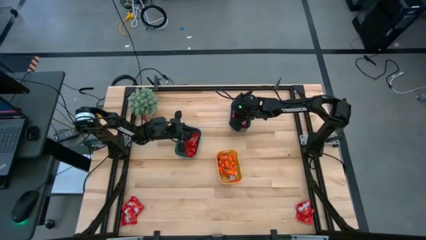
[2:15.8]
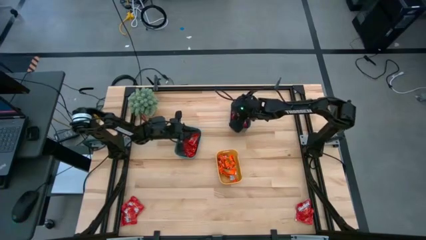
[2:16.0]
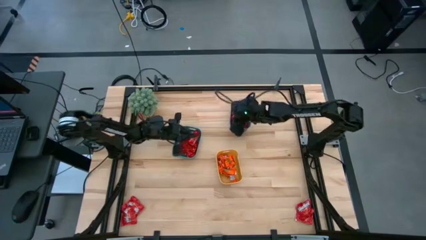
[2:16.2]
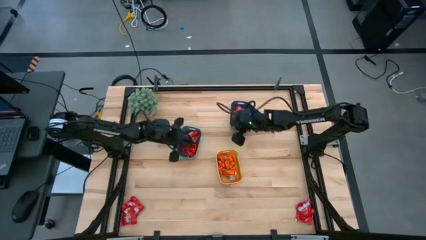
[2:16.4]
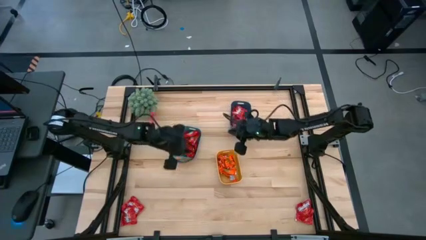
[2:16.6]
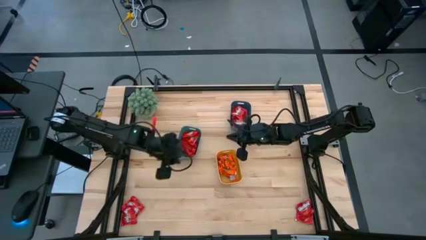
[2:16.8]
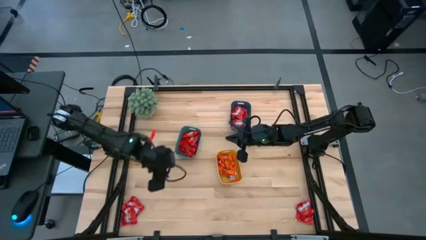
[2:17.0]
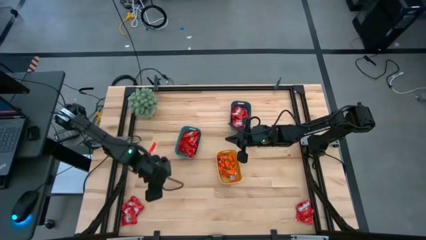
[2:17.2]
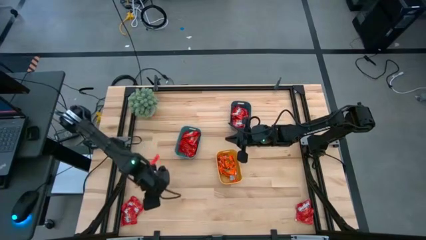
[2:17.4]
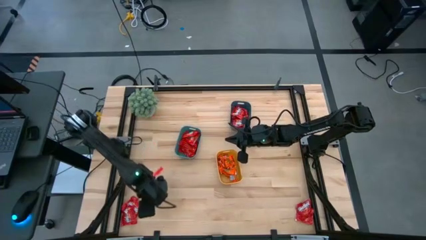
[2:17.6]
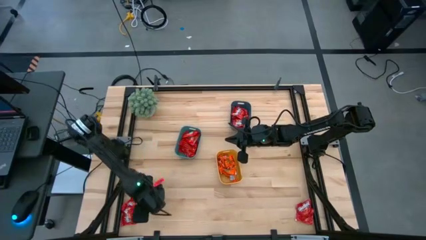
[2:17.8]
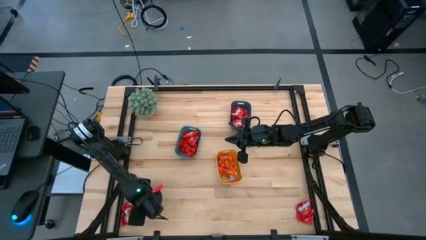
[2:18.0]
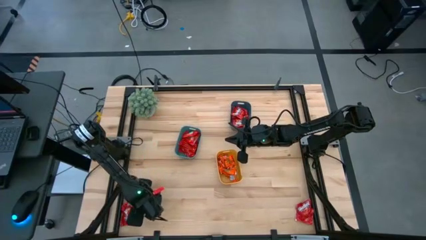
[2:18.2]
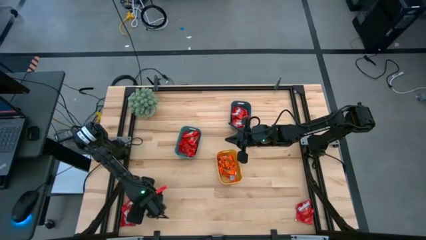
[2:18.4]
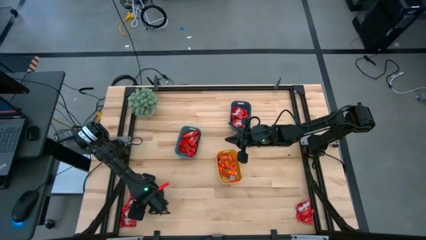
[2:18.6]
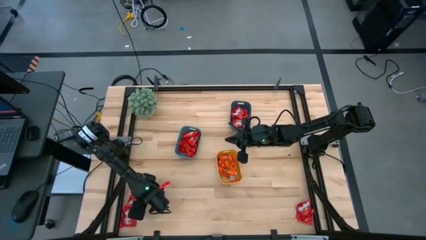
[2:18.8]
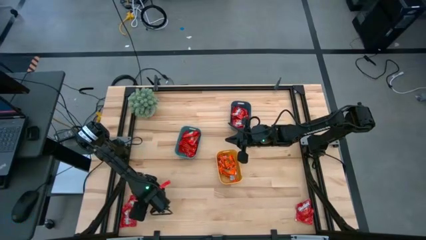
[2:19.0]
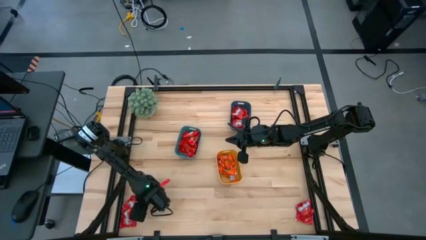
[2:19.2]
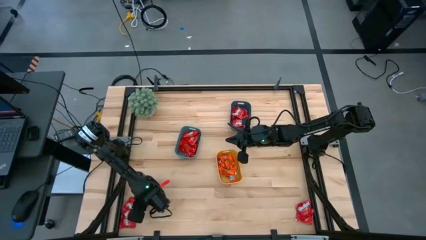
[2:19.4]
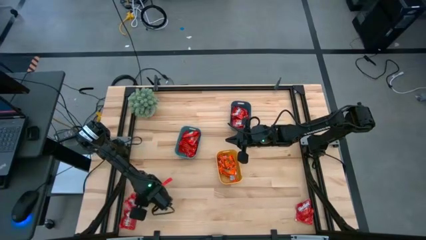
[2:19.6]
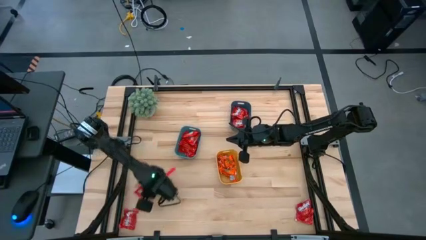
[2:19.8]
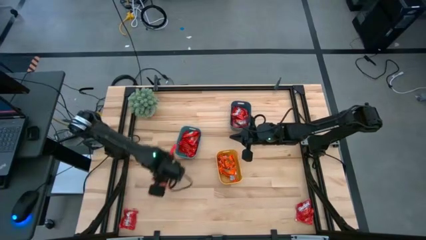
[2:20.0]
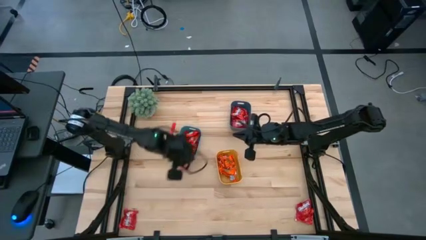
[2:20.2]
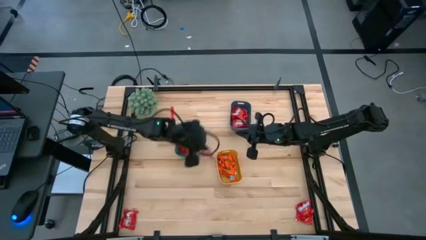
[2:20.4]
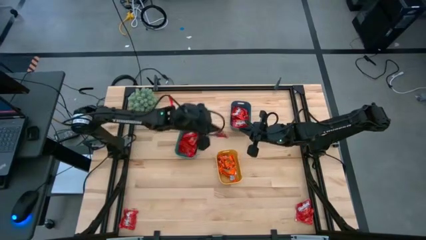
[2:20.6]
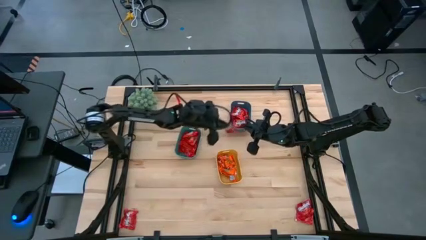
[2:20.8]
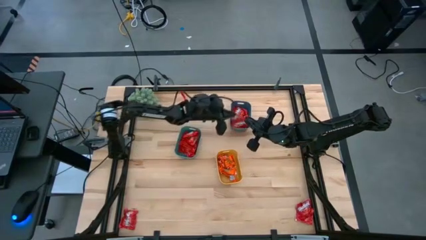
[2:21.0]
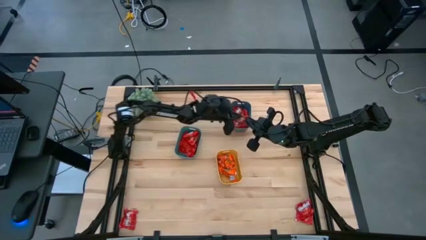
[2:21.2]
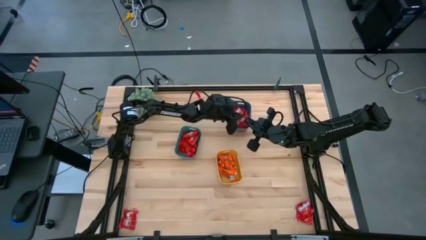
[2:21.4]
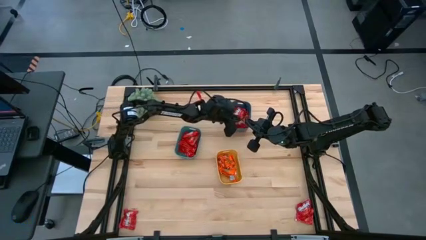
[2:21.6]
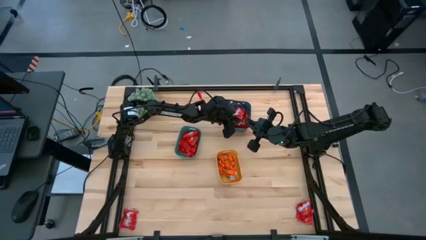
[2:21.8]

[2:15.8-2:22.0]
Task: Sort candy
Put the red candy into the blue bin

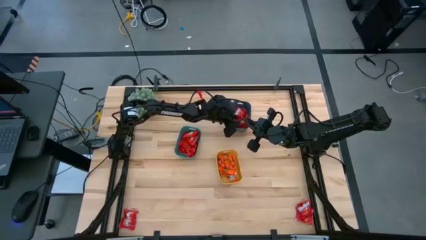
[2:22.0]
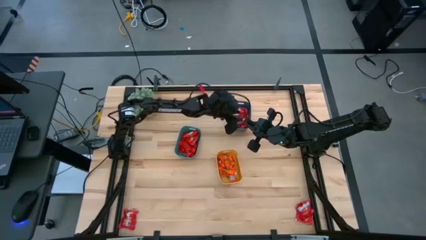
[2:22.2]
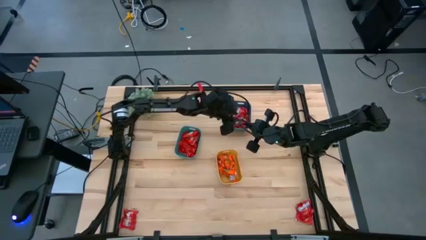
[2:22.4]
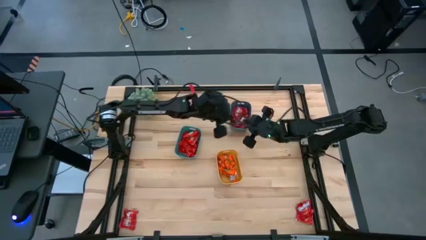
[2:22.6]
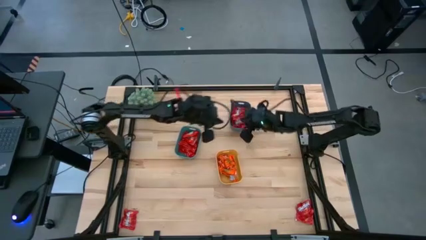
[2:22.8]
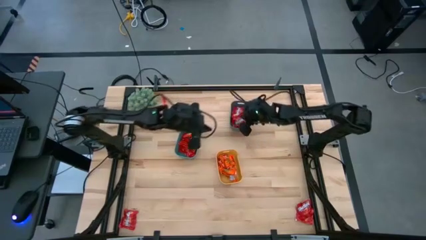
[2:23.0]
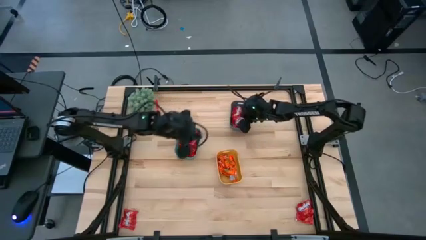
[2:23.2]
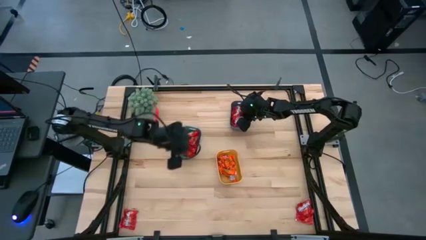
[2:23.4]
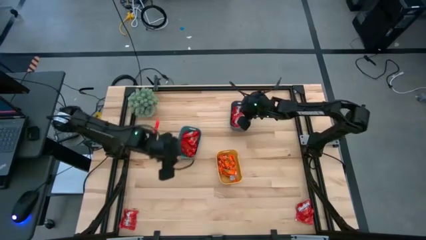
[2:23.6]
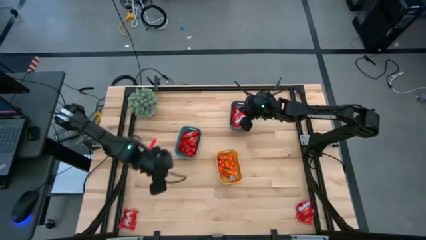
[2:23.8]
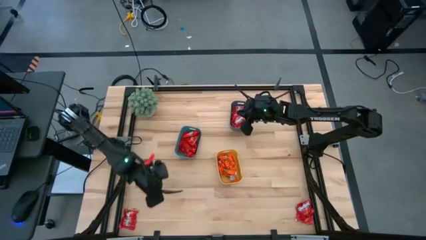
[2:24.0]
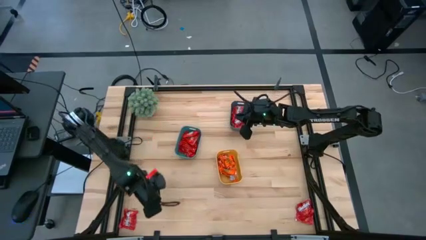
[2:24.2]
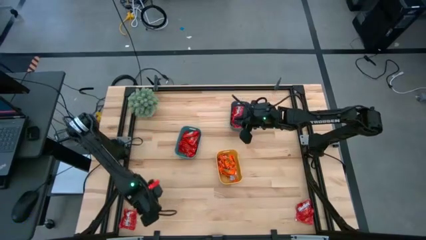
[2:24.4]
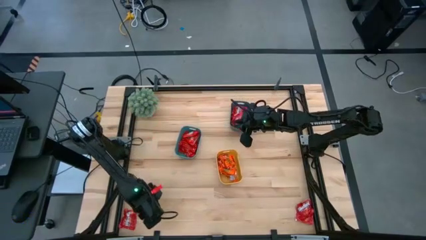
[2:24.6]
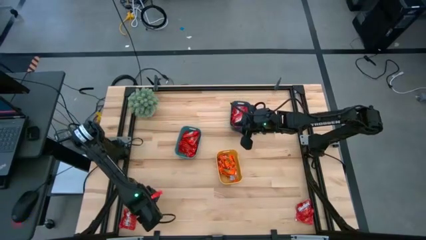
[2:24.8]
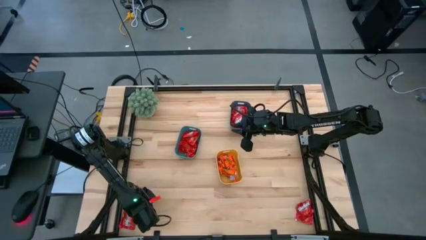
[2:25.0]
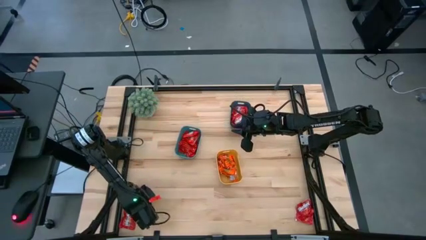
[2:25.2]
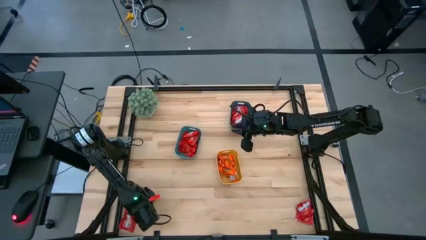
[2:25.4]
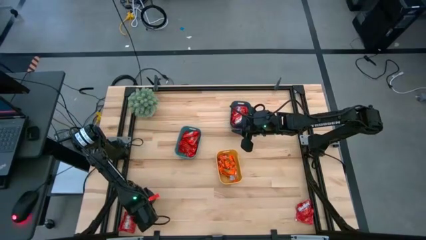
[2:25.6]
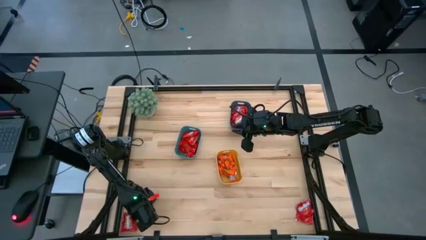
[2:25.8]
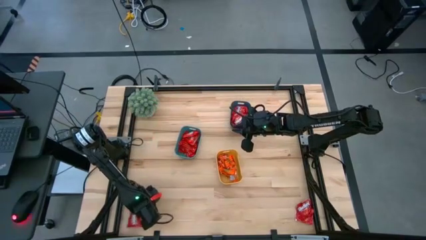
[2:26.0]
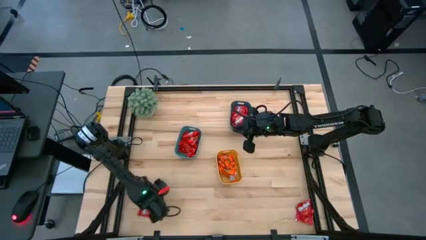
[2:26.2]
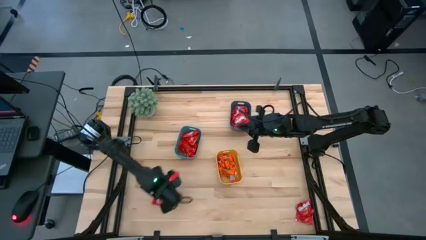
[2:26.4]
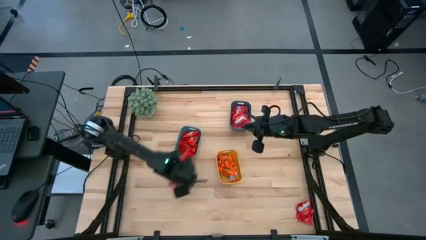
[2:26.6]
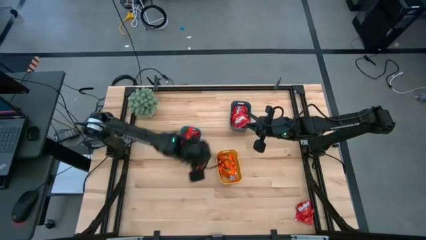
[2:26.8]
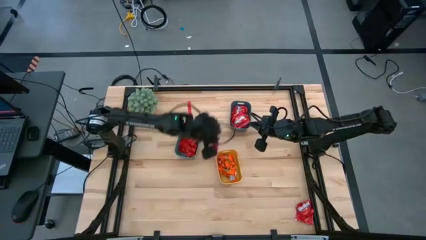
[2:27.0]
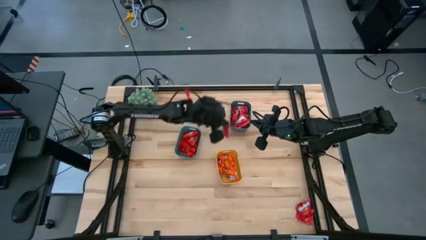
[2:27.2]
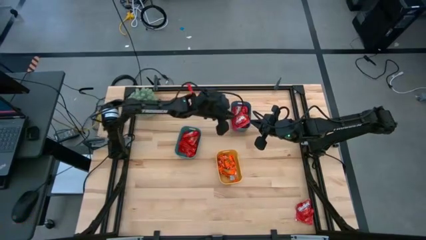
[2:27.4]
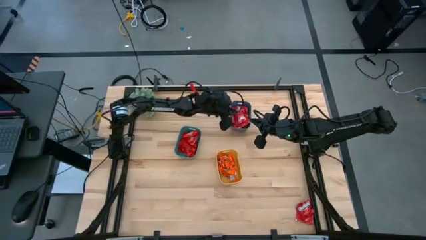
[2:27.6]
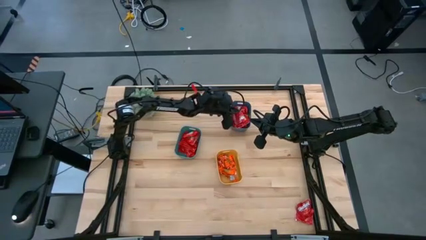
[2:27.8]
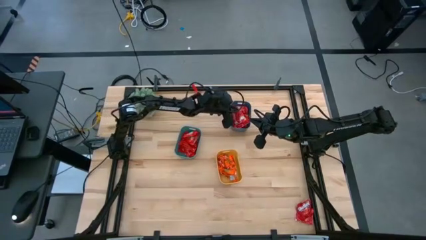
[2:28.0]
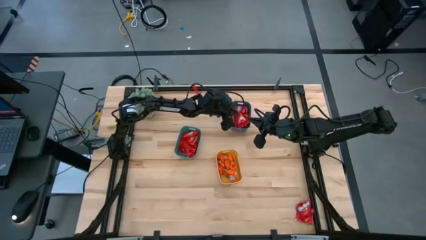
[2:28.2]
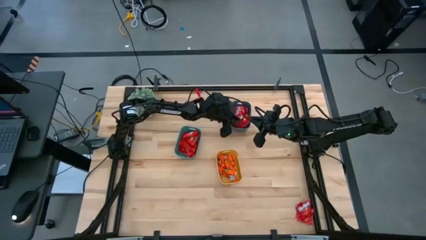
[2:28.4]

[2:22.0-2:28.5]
Put the red candy into the blue bin

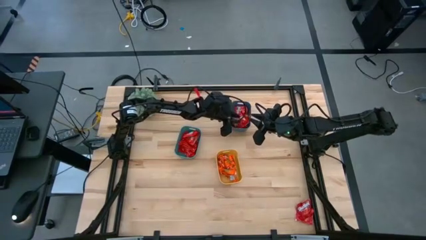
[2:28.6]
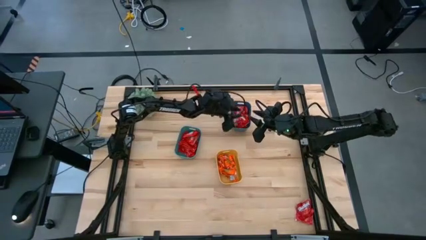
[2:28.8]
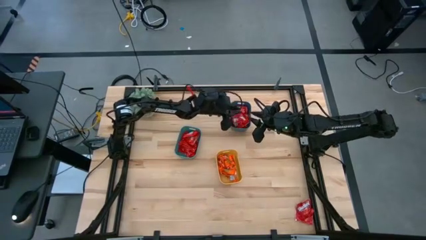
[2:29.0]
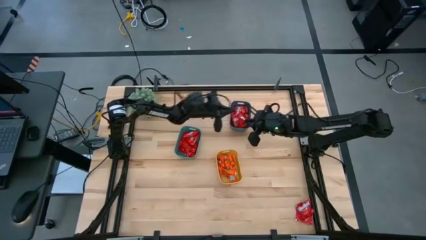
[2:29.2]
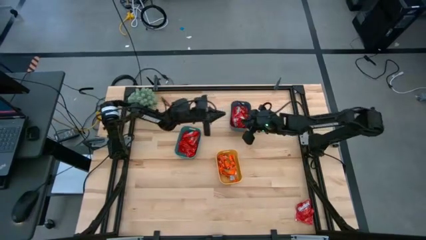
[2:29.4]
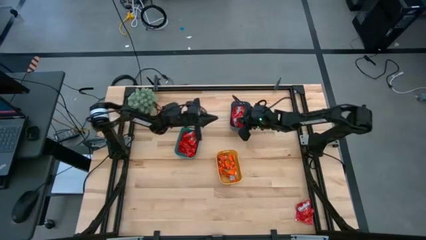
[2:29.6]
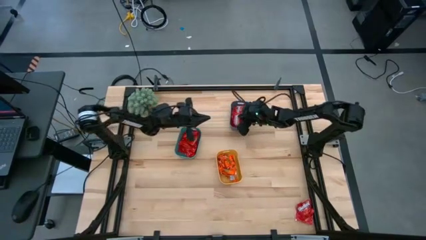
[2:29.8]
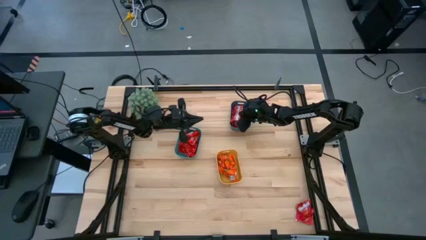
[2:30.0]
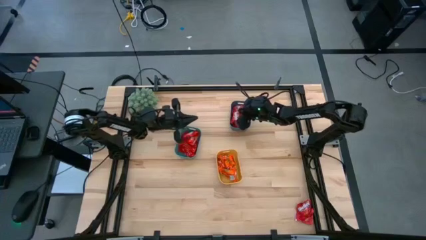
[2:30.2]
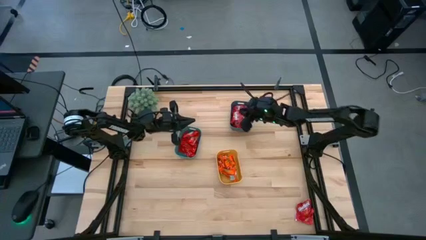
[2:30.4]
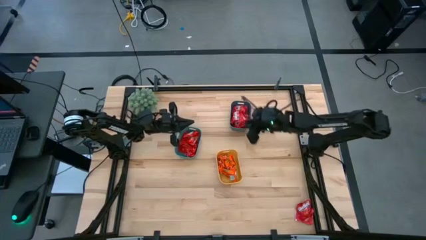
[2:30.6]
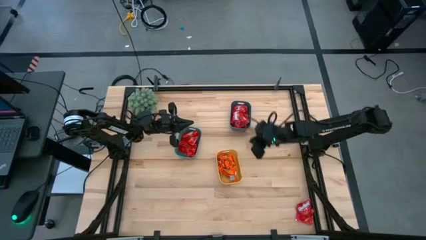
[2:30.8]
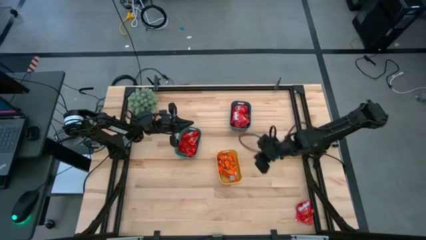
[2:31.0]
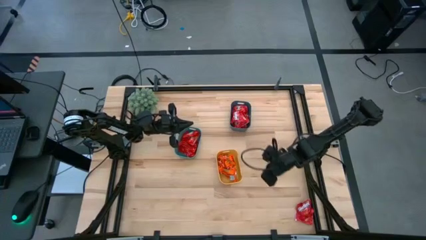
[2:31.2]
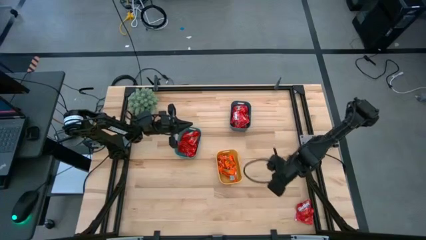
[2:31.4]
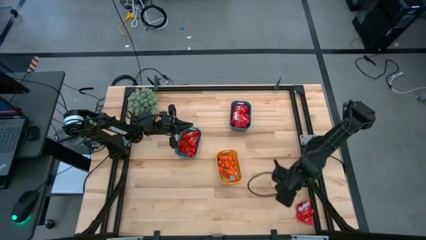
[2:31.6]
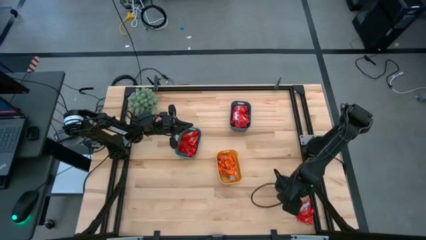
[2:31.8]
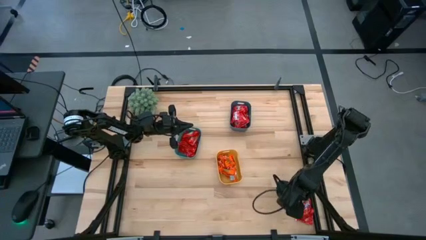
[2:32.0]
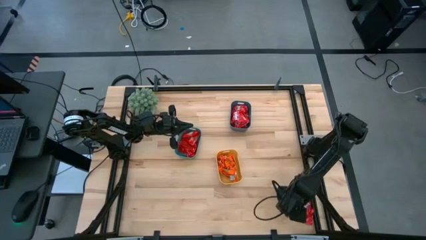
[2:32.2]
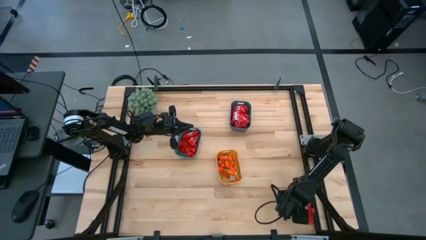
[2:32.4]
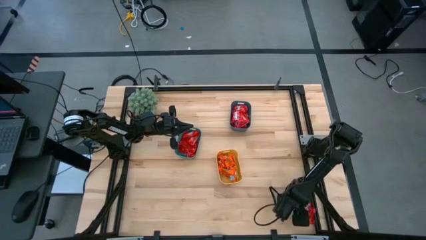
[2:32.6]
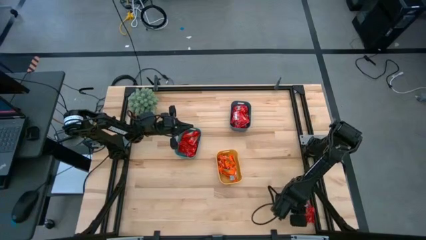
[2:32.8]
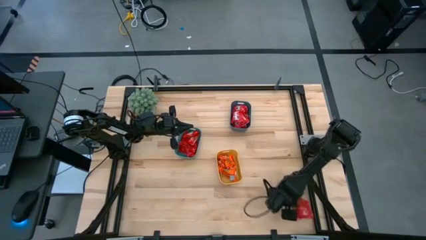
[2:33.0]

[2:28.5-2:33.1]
Put the red candy into the blue bin
